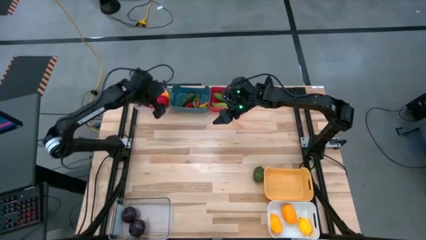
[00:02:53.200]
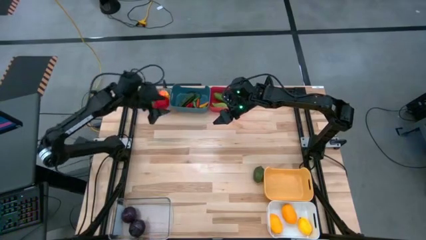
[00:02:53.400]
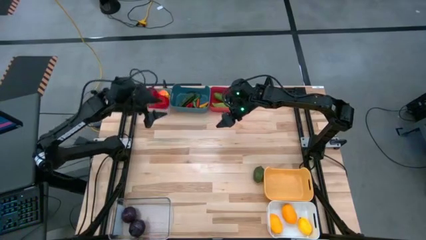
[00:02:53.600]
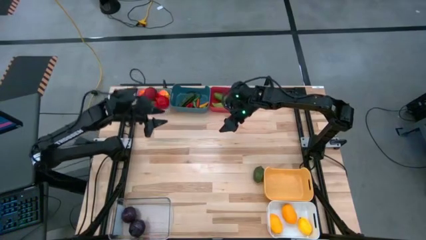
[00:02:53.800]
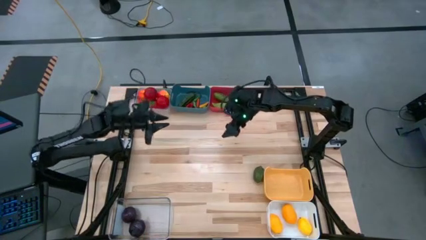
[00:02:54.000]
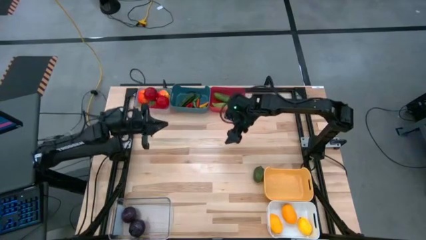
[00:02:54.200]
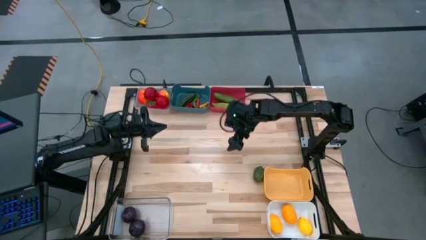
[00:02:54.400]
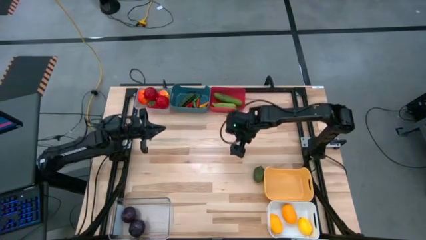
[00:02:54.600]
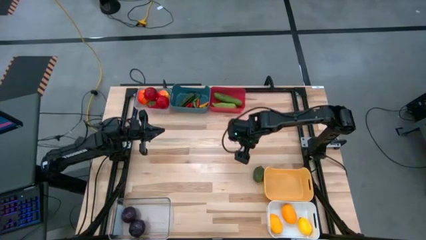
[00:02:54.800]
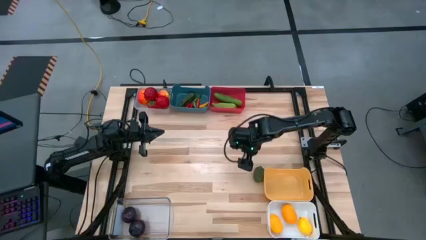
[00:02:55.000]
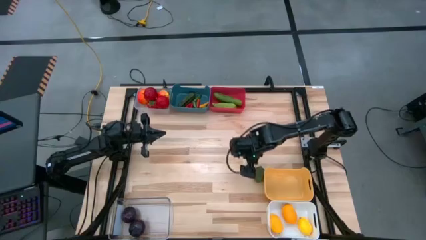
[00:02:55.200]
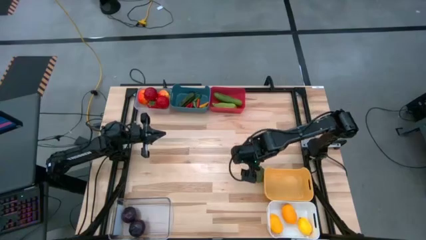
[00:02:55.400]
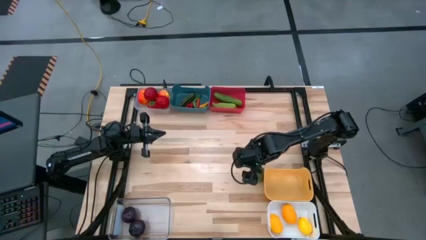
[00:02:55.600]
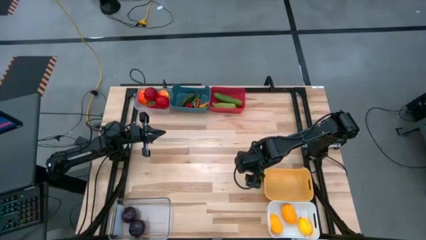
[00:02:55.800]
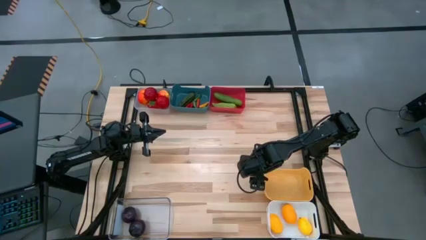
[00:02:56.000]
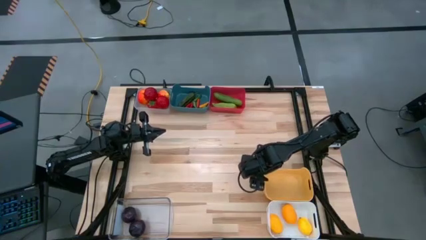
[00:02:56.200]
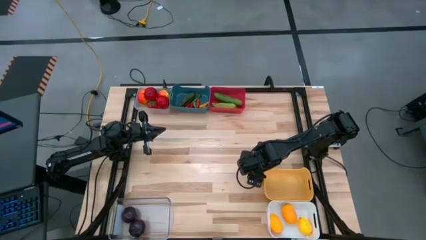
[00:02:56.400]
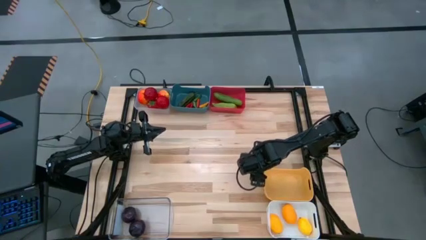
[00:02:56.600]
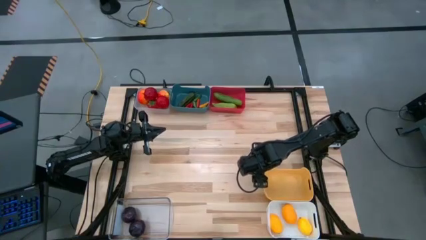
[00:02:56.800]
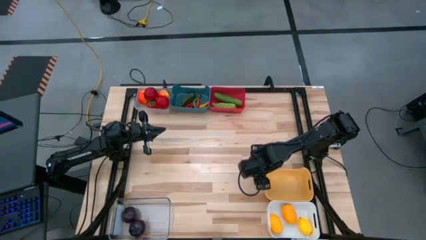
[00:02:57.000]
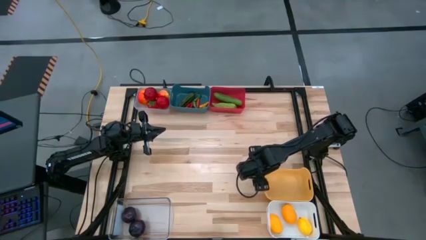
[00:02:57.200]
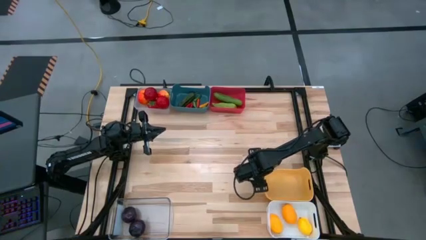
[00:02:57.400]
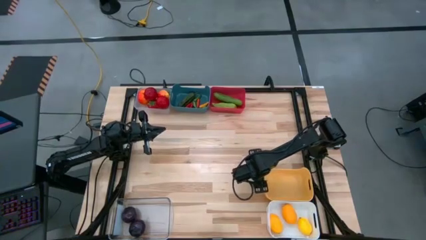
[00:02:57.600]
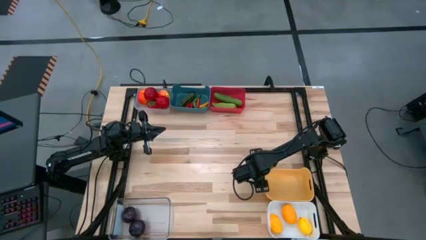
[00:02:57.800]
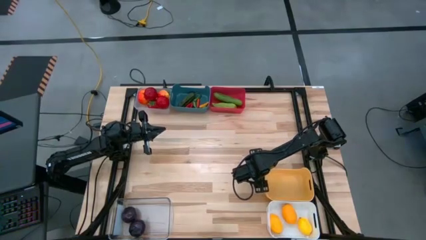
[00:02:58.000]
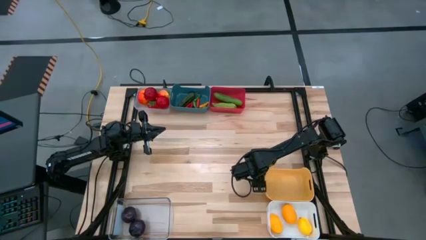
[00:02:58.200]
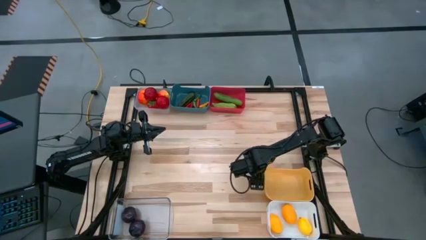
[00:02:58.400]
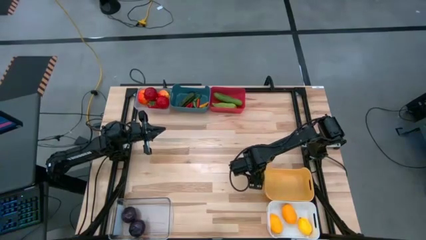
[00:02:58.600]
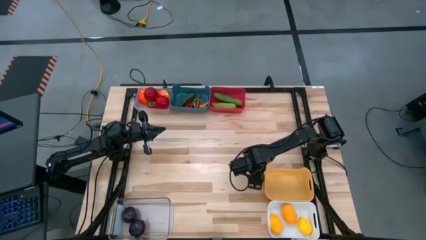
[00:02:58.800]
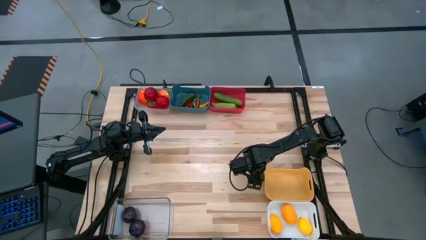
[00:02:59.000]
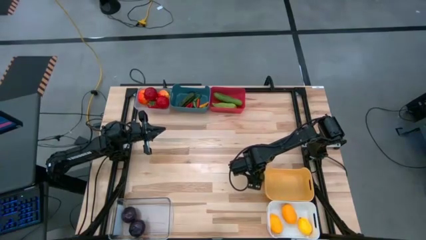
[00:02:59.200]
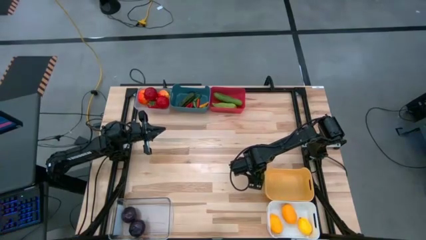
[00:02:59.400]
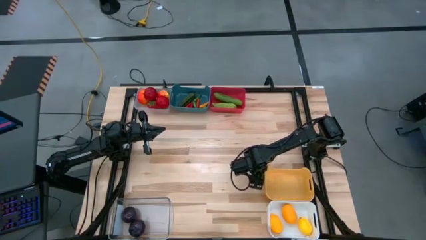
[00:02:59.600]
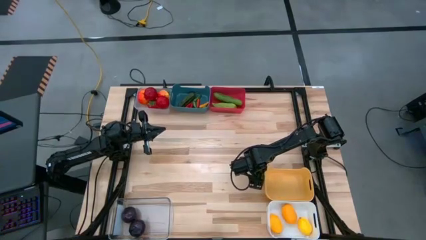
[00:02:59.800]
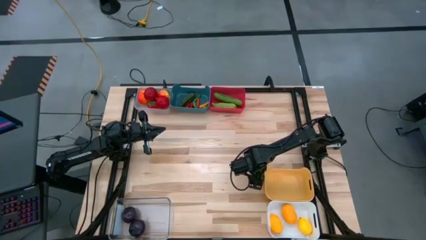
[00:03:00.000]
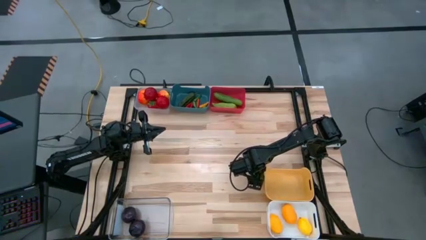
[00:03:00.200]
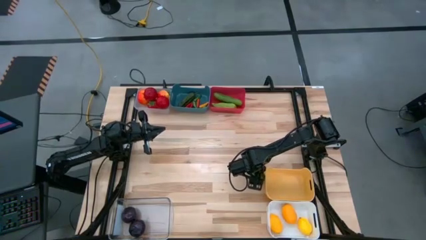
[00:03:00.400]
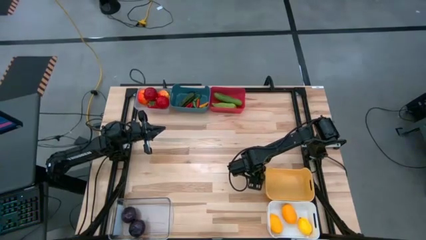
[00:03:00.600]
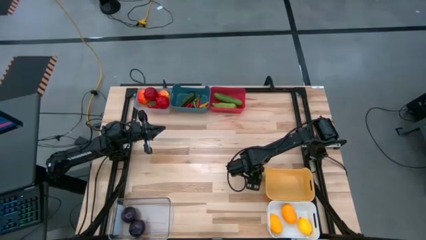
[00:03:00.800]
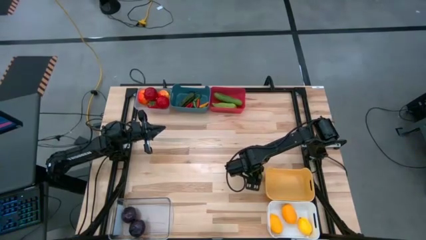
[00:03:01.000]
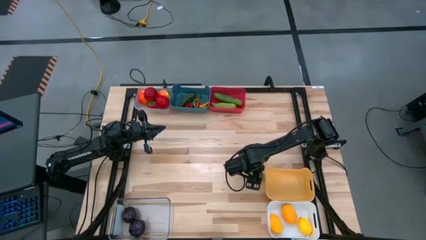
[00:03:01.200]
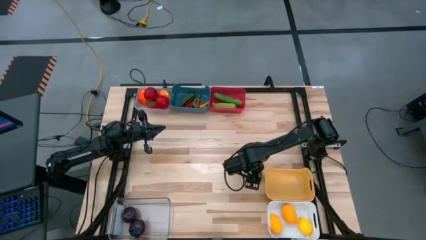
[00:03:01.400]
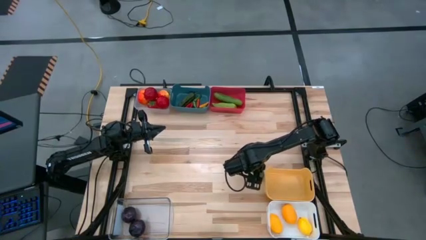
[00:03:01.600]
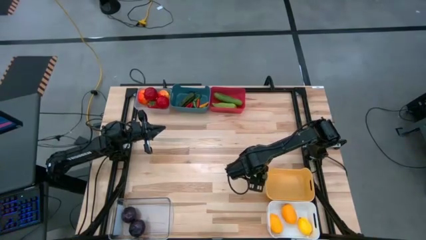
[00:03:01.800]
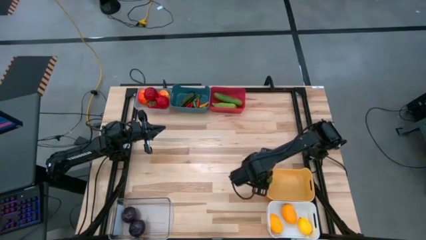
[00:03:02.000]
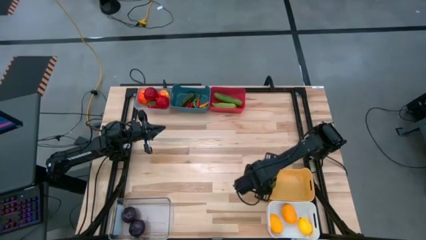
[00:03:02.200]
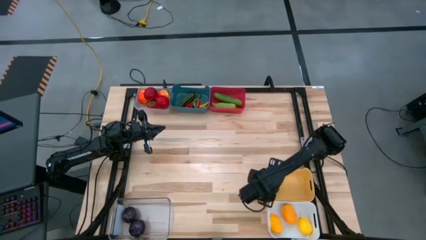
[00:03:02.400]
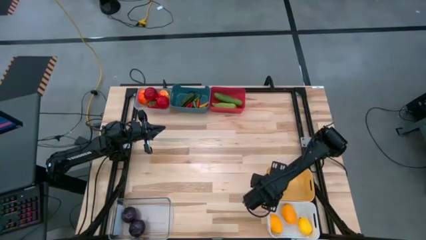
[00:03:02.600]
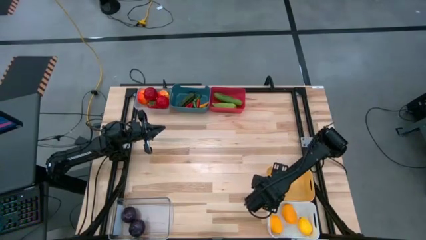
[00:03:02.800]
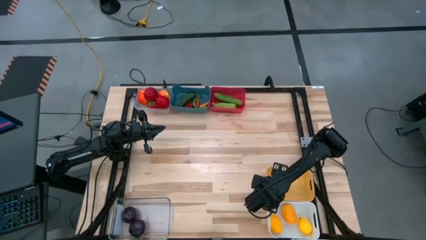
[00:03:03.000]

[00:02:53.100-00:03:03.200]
Task: Sort produce into baskets
Put the lime into the yellow bin

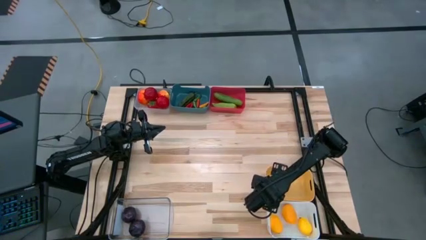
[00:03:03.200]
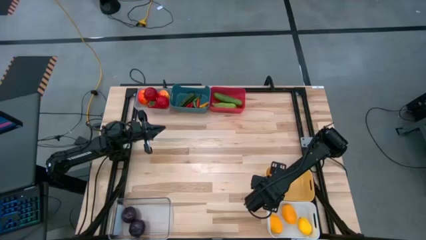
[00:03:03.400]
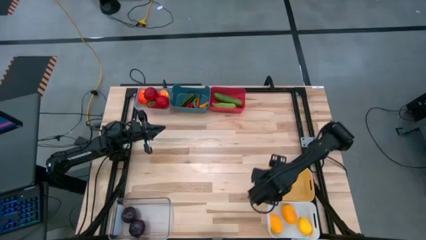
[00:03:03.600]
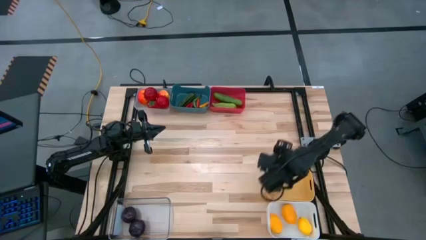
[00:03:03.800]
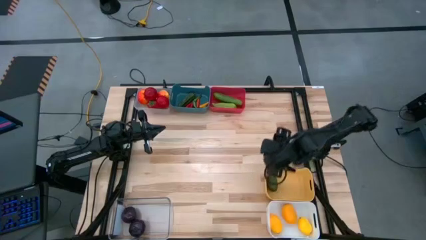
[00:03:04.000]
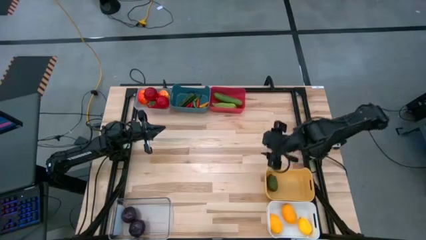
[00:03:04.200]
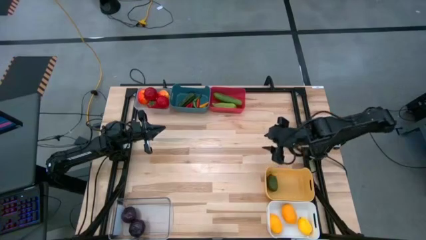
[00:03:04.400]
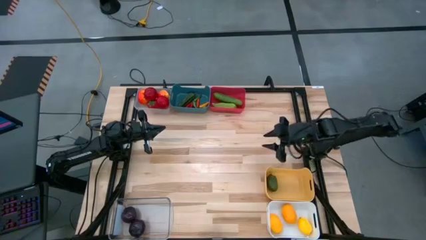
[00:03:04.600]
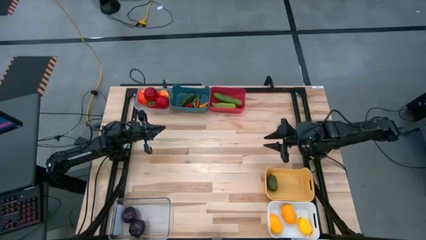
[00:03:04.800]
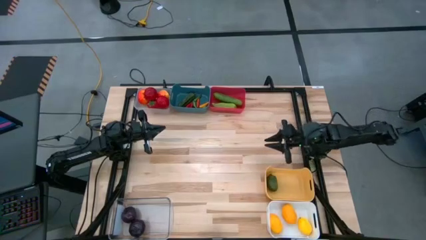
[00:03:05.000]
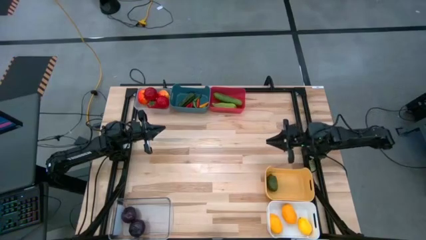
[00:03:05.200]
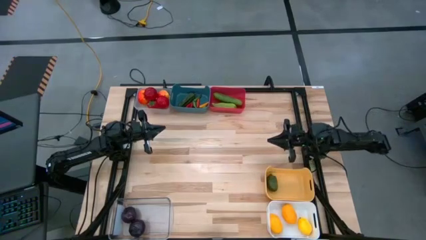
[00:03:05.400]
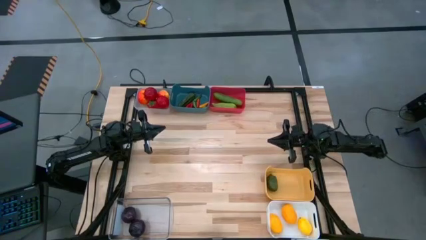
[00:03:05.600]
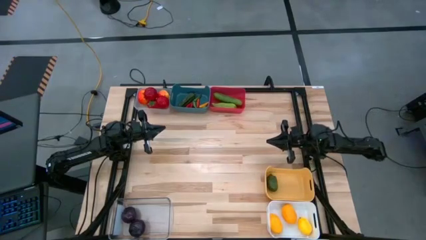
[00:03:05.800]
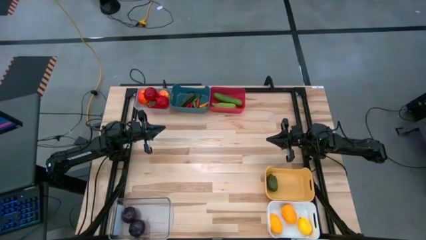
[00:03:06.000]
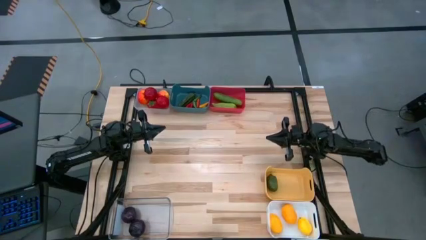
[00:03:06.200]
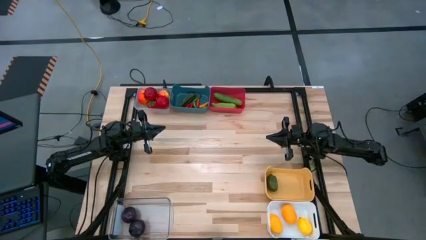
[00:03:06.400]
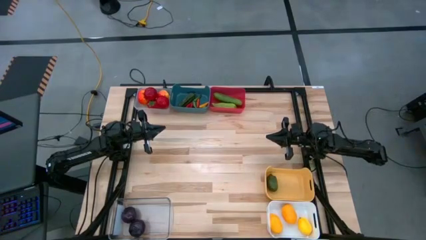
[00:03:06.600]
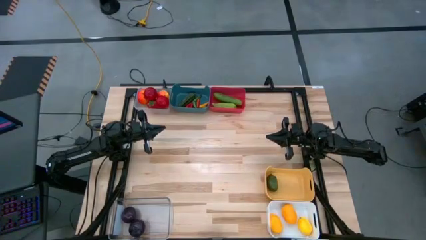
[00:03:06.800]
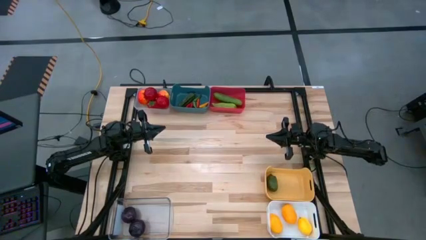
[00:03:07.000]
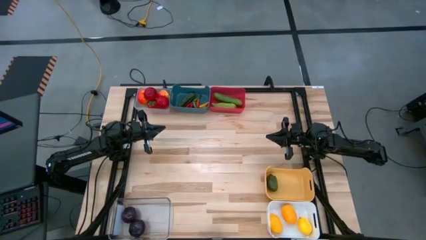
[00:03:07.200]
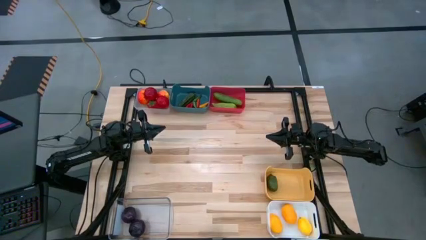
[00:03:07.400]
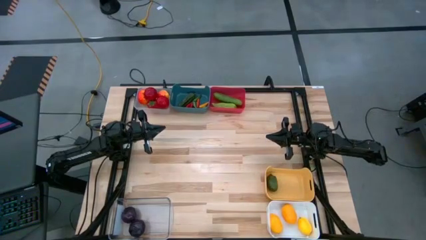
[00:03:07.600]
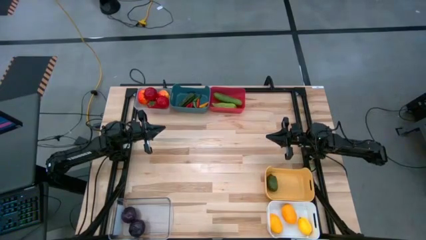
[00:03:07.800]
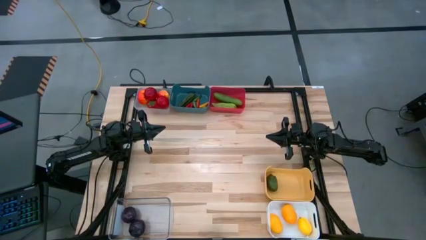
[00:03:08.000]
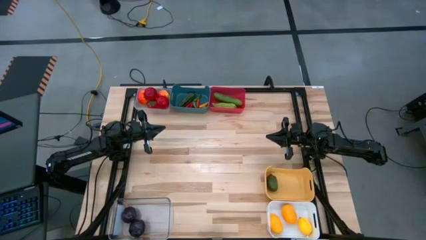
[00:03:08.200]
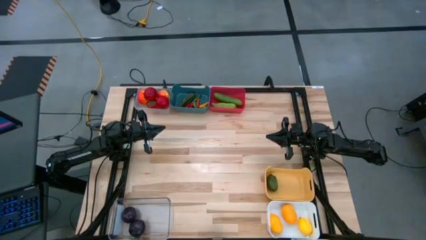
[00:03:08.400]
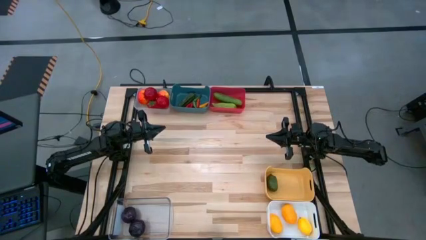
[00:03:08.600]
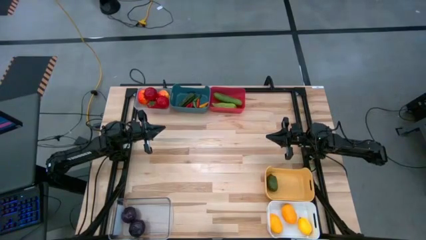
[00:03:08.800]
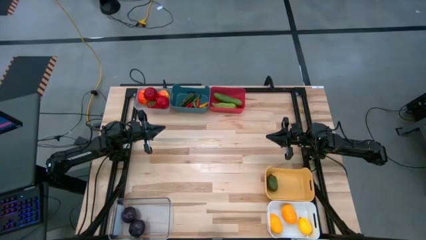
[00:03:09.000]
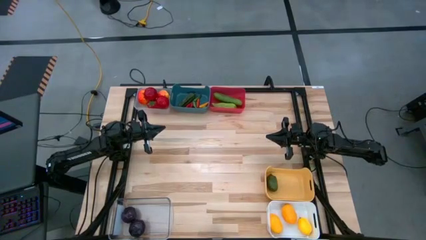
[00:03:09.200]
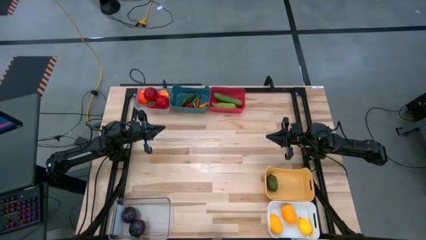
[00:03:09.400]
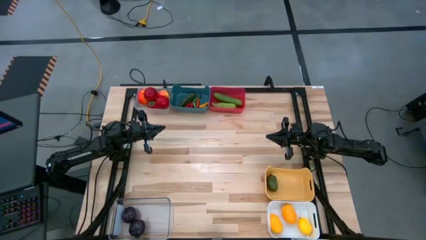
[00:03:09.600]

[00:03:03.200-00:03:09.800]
Return to Home Position
